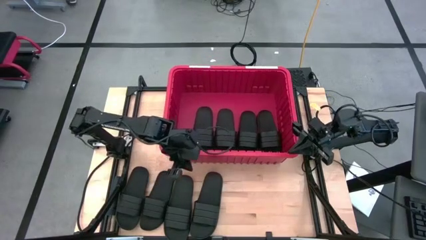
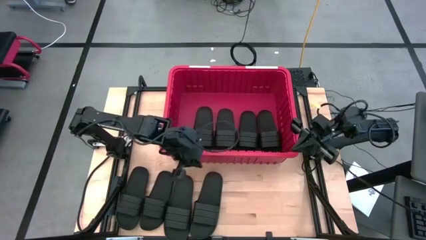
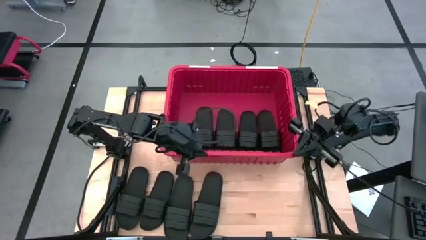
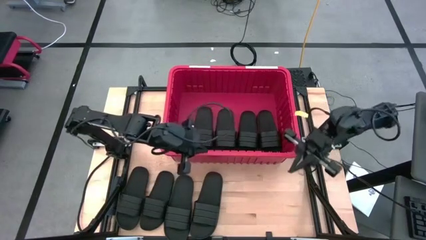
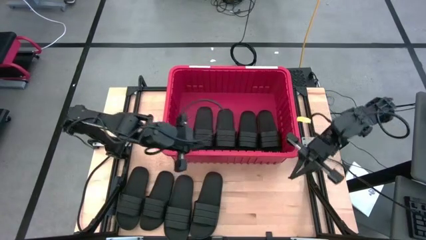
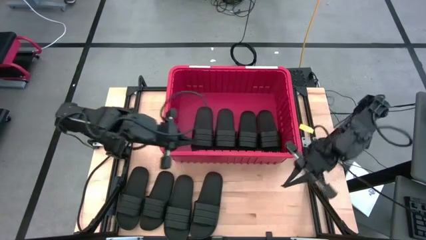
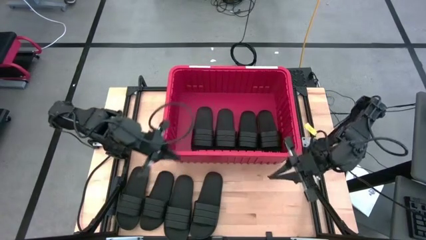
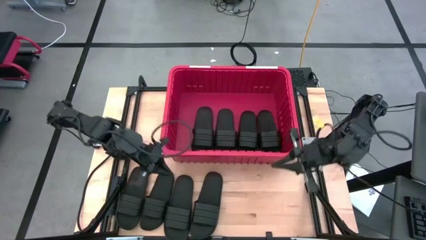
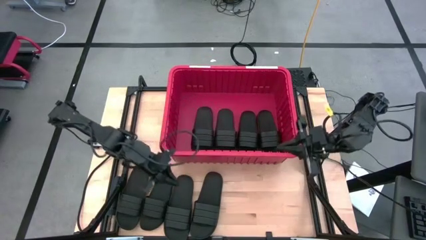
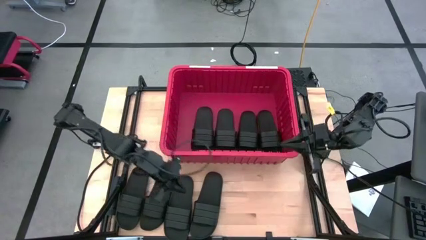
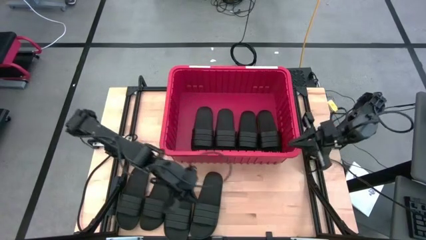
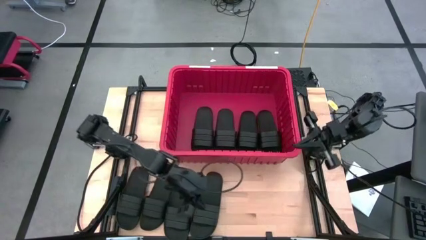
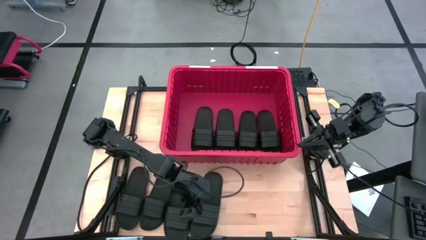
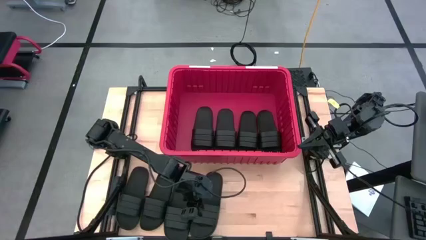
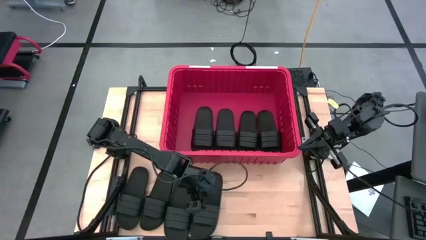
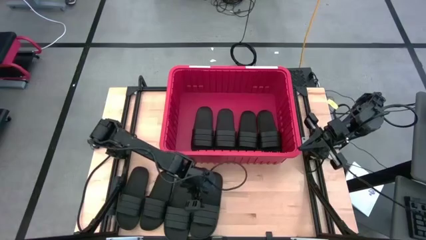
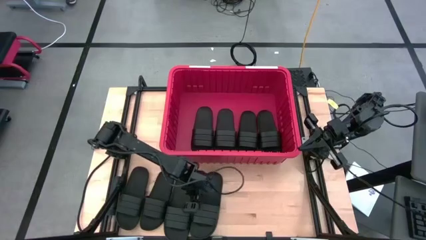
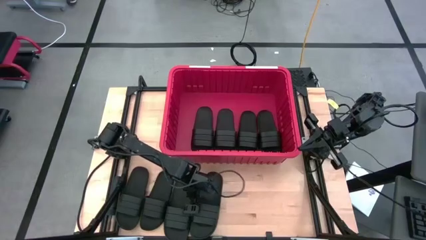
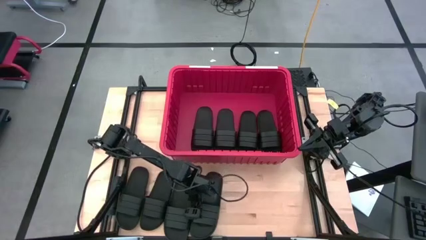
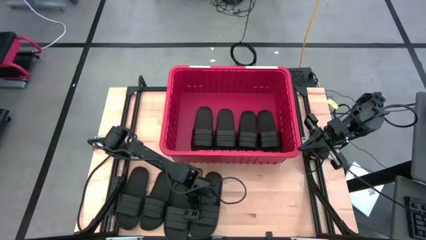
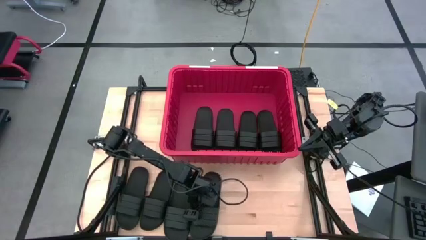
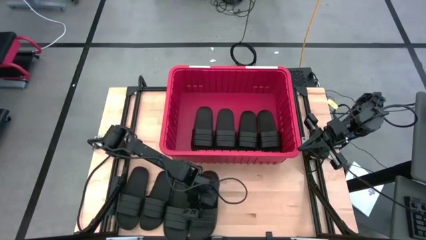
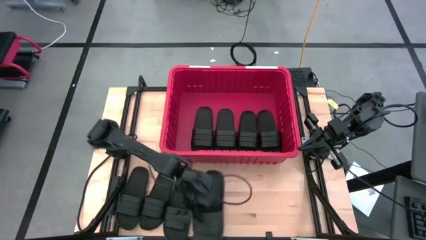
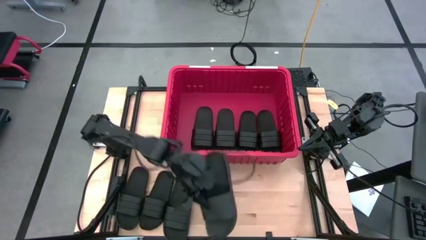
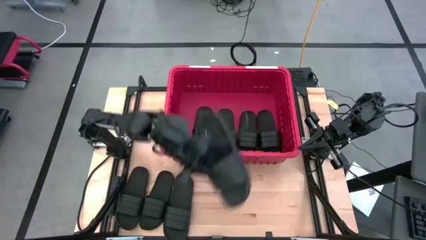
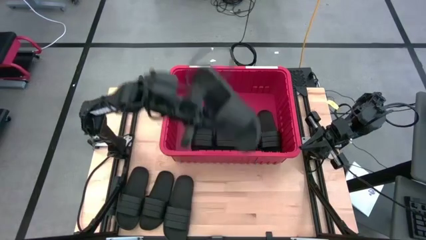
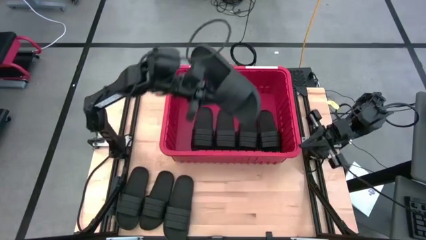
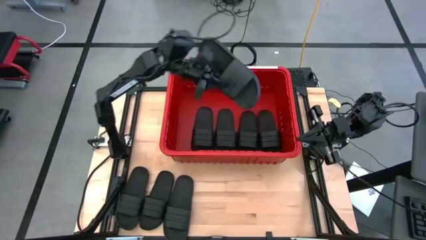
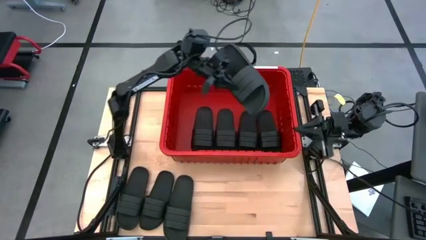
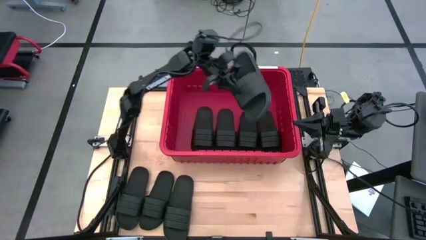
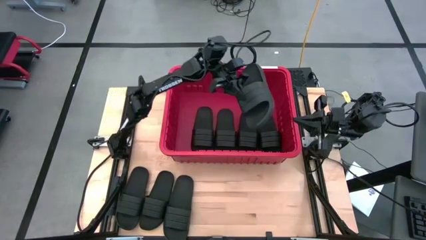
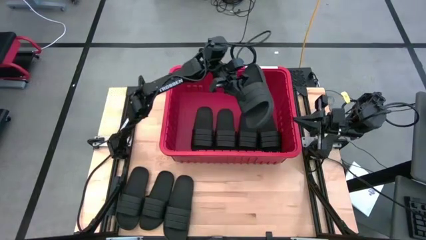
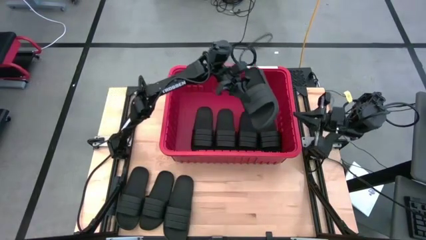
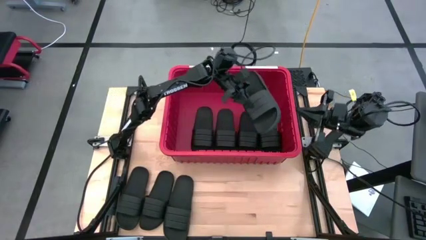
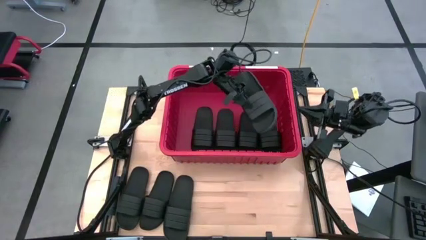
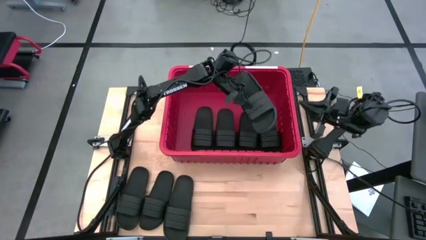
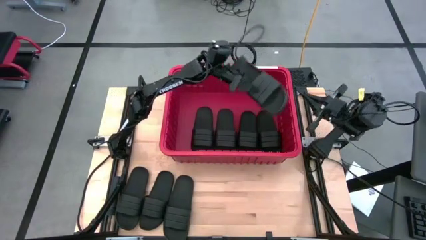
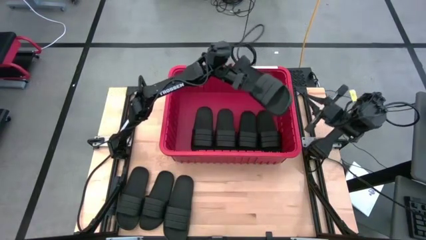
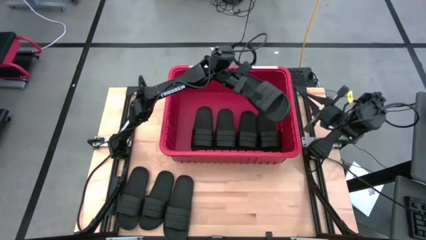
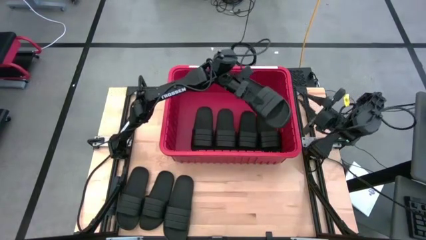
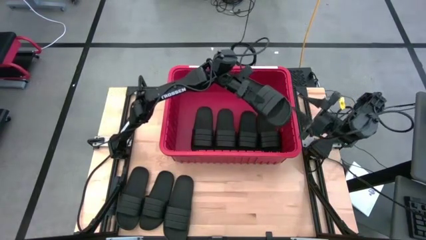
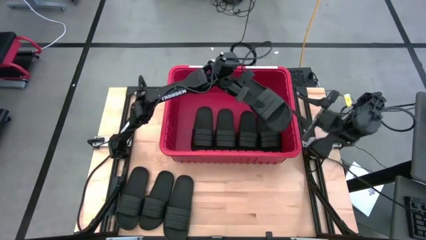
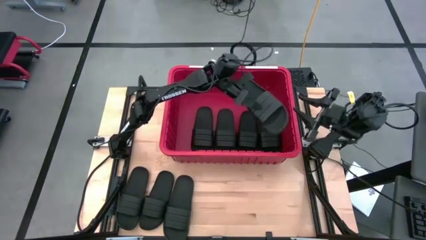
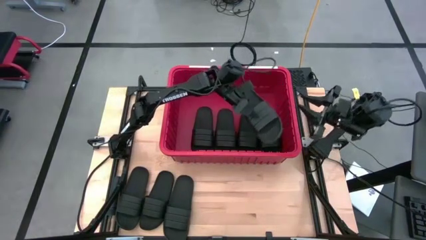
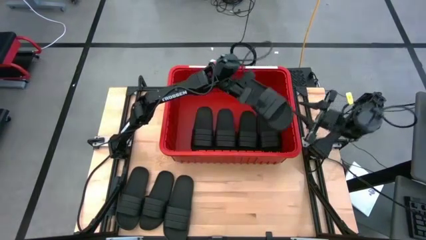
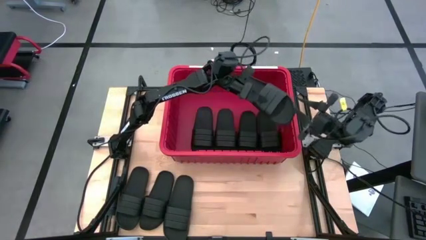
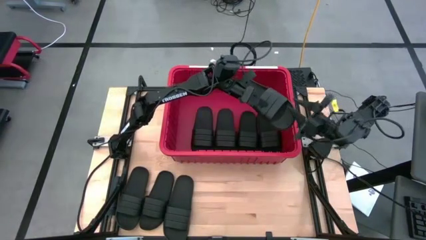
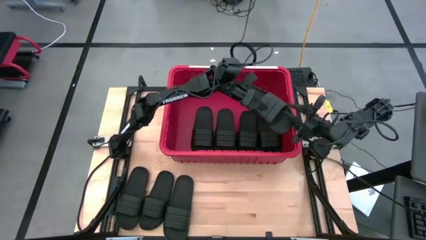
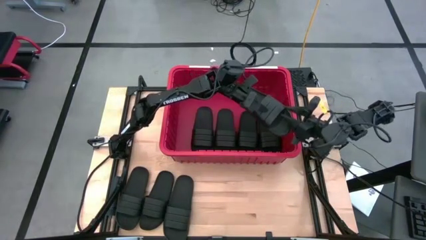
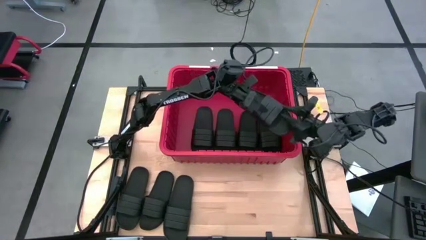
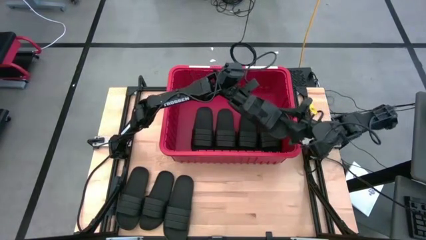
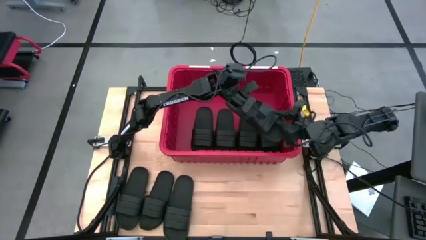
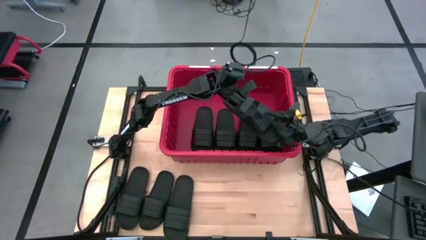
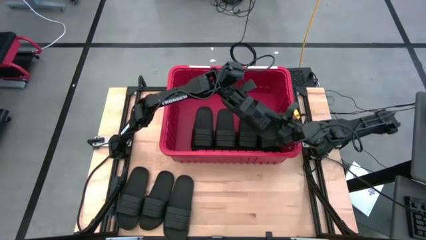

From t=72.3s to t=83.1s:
Task: Pick and place slides into bin
Put the black slide into the red bin
